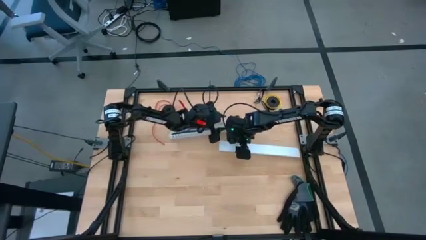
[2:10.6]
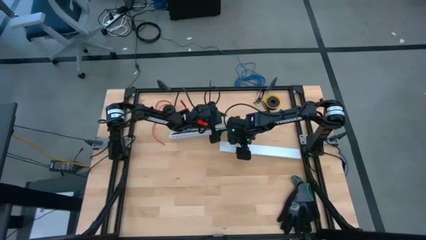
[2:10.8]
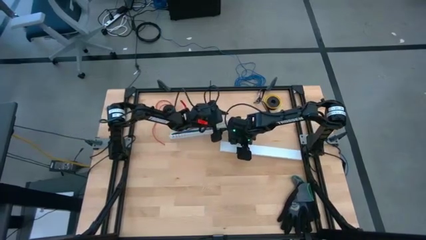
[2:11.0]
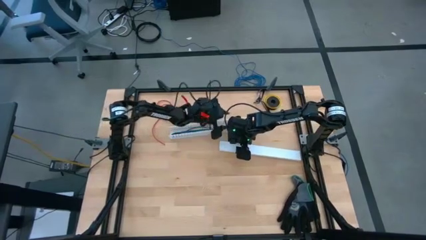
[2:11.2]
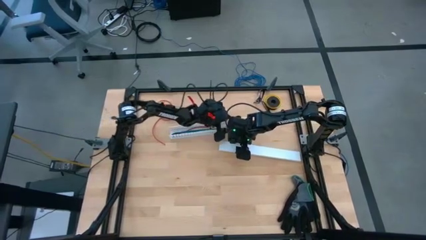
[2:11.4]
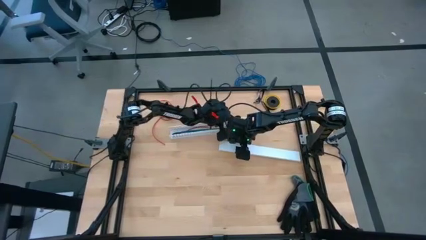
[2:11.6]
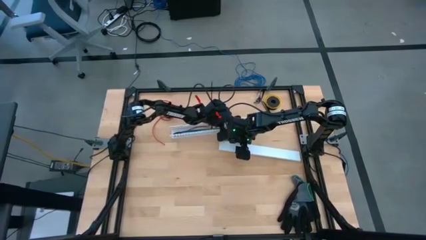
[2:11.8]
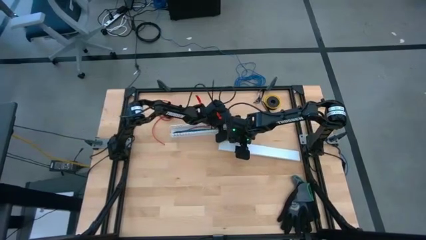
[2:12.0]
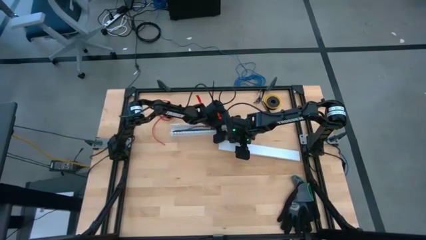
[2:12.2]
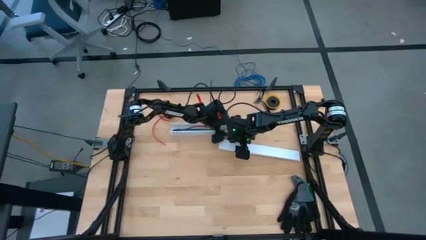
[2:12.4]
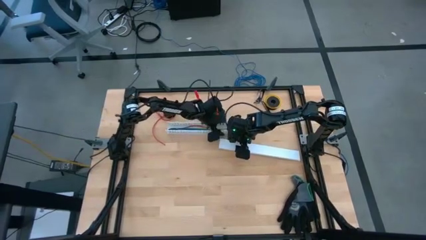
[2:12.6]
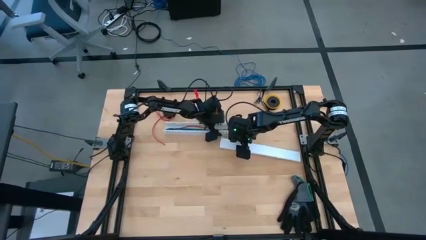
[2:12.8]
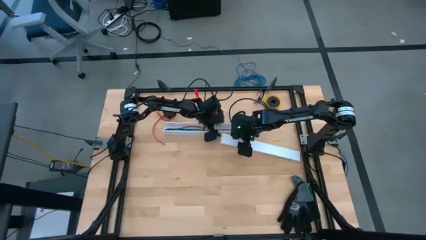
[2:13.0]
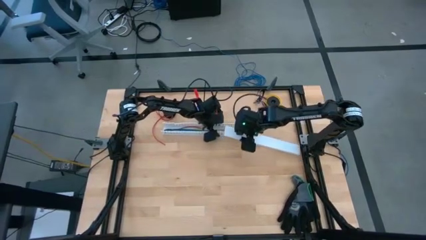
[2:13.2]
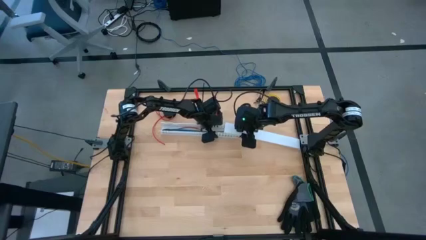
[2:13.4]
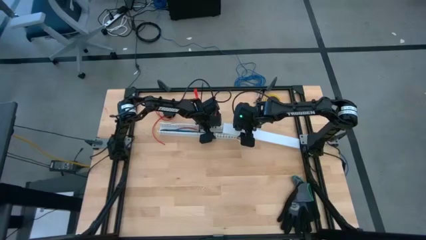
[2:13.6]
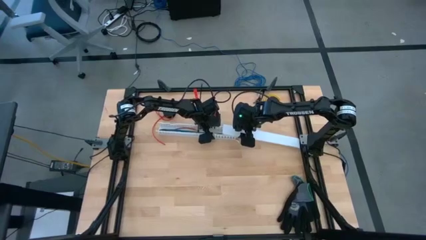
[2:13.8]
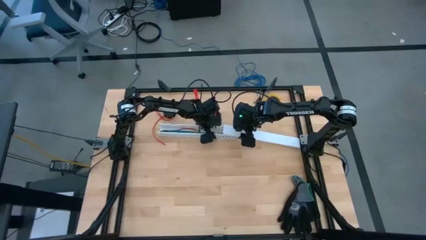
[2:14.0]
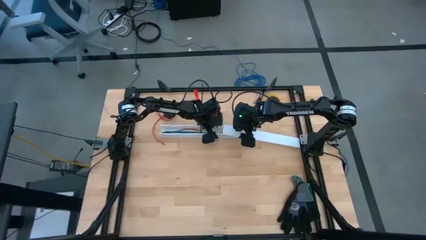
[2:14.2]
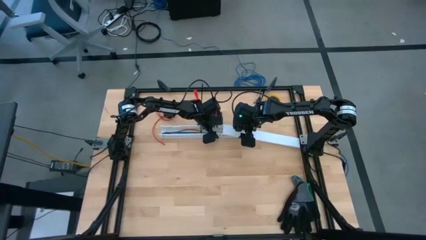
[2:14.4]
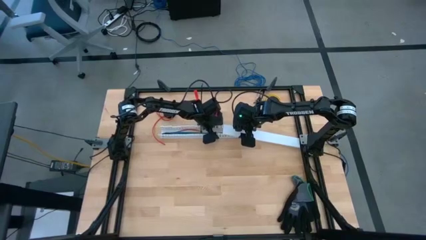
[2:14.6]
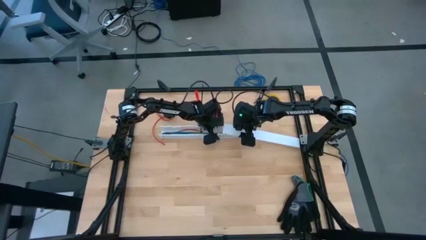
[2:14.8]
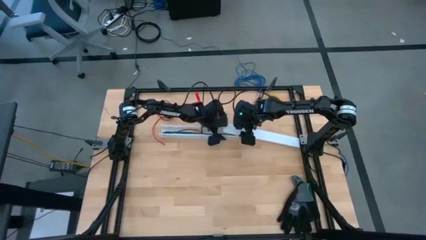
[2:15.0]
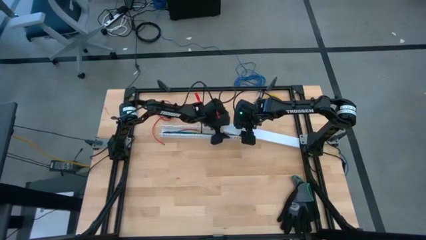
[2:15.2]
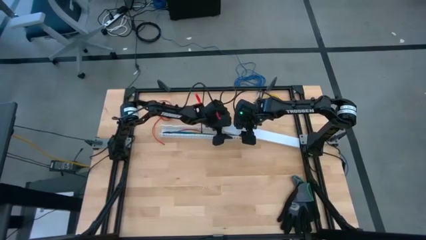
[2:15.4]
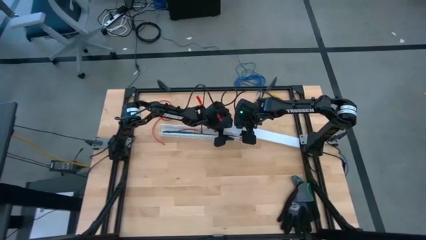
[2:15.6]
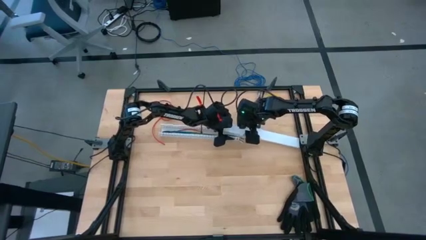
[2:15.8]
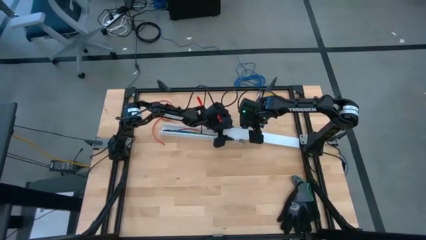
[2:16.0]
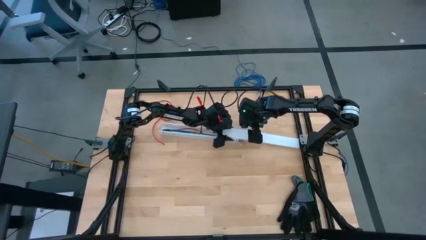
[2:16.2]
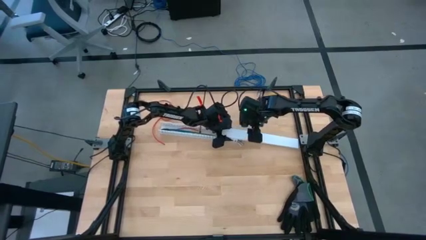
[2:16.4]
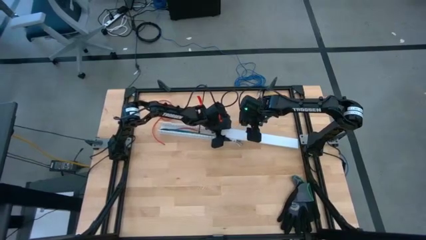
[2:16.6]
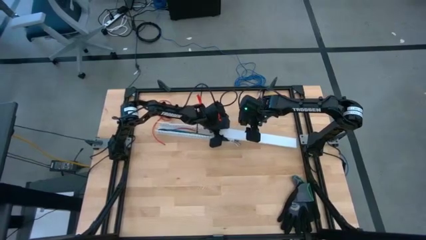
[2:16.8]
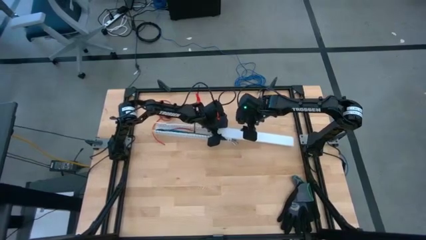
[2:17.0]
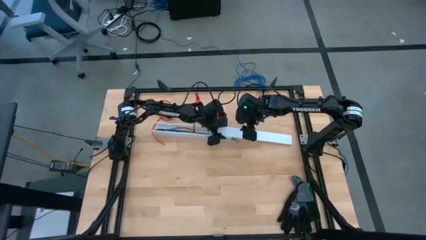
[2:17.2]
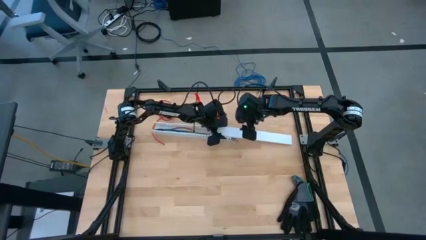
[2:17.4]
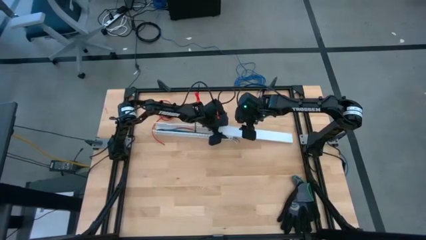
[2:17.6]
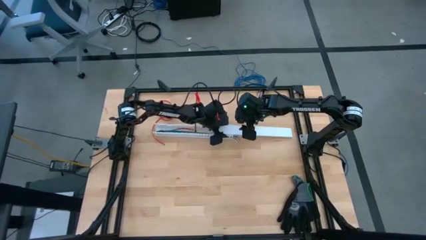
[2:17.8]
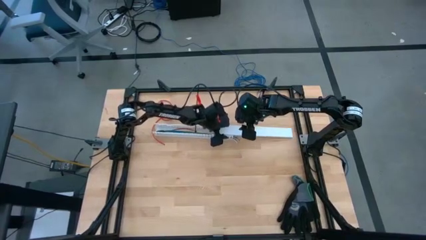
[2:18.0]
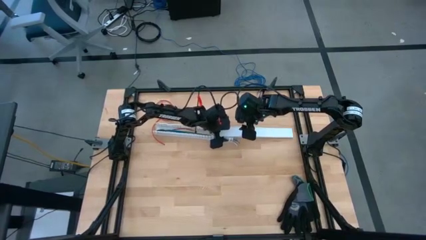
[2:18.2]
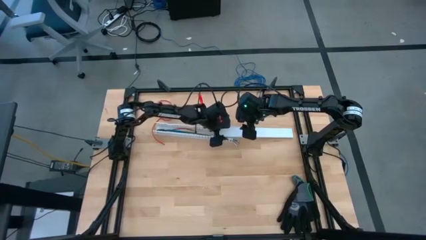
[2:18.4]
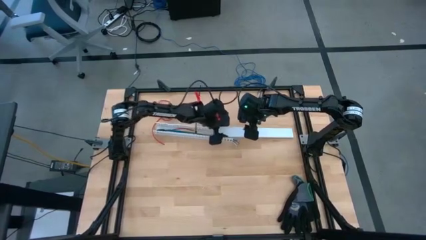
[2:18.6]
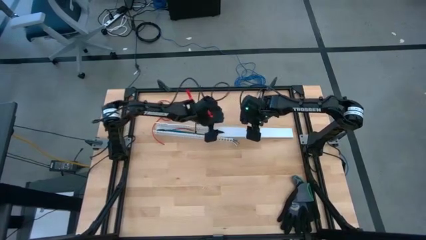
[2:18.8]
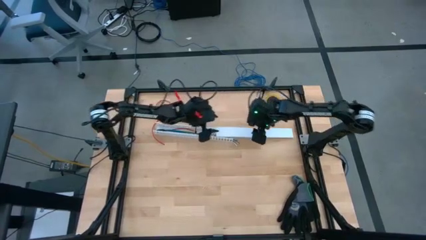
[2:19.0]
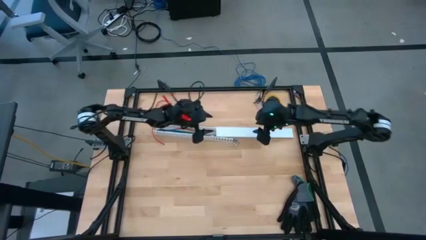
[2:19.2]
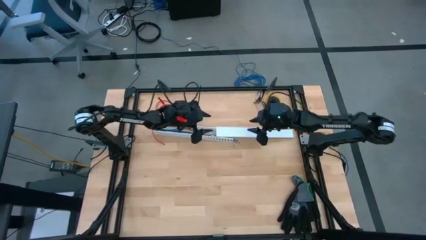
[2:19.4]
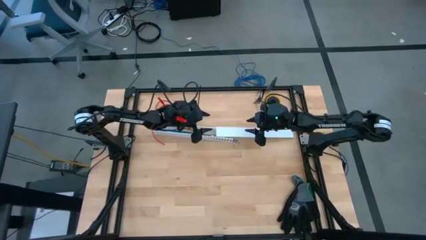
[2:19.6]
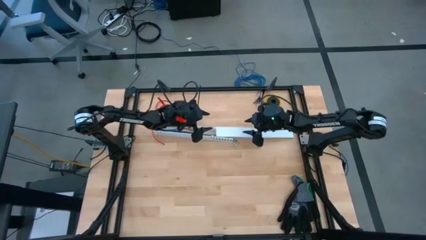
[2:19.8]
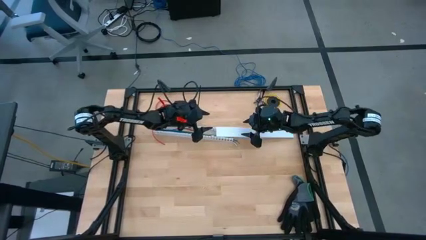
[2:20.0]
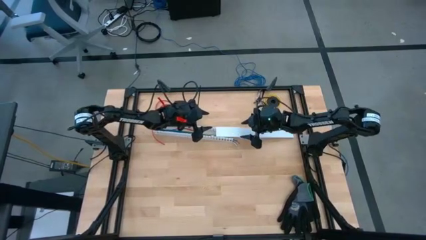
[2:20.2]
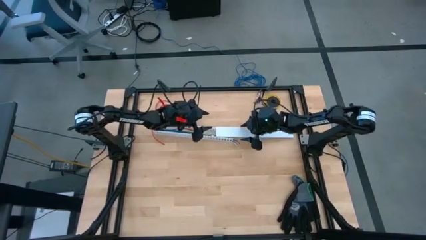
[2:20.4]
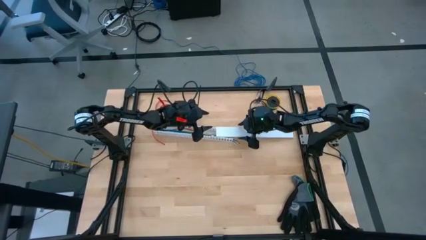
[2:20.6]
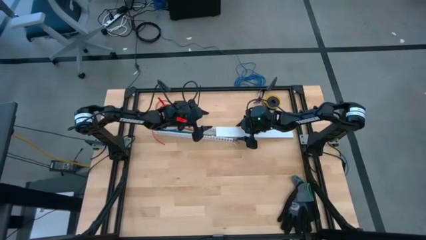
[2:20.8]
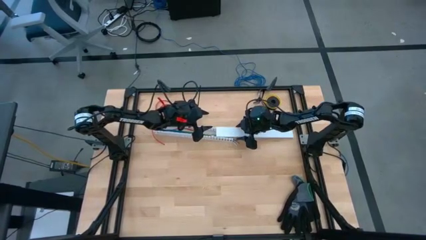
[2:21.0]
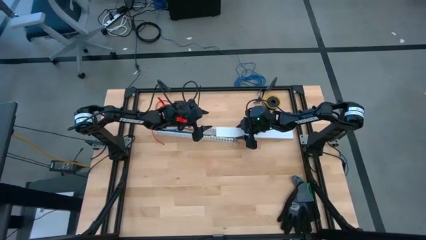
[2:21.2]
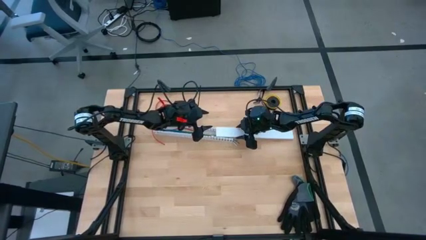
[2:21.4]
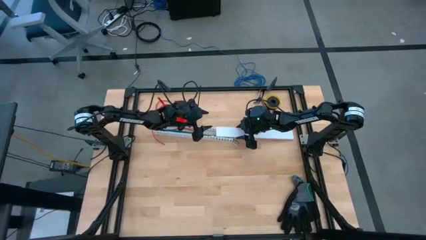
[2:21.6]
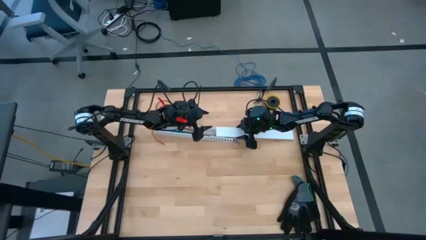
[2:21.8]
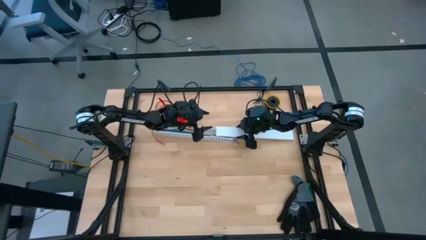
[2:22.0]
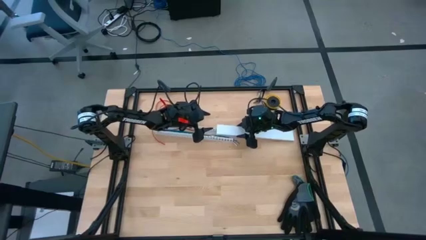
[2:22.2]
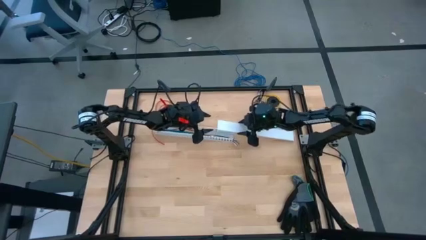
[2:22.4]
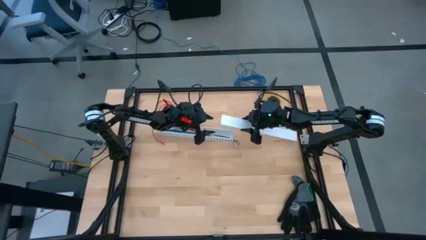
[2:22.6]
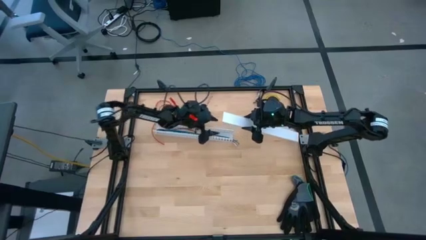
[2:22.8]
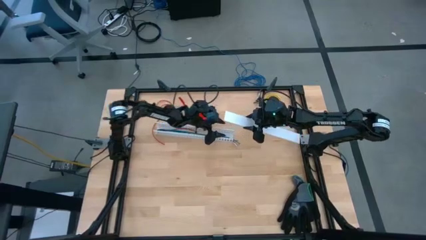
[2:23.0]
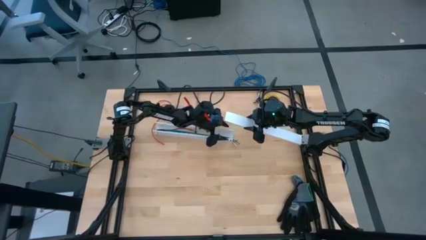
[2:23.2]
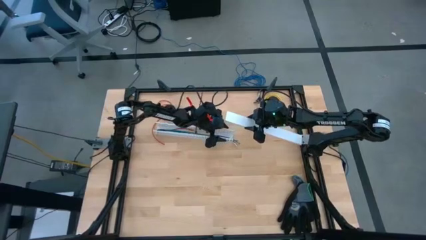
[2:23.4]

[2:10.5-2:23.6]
Task: Ziptie cables
Close the white cable duct

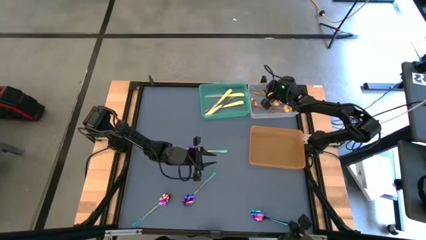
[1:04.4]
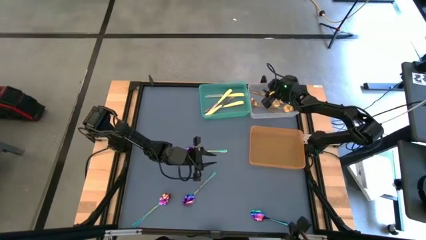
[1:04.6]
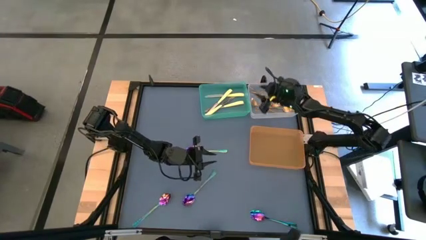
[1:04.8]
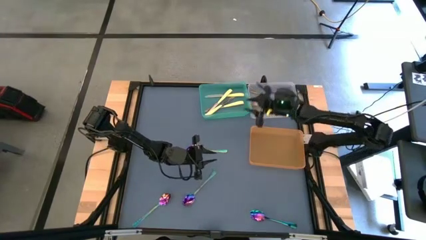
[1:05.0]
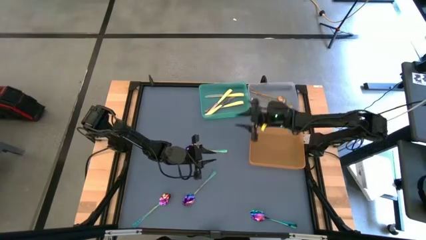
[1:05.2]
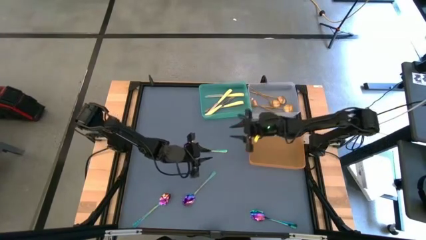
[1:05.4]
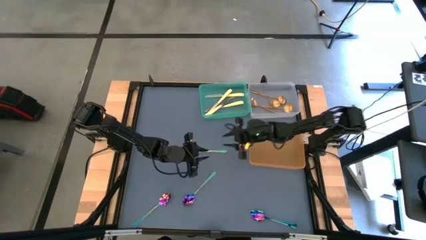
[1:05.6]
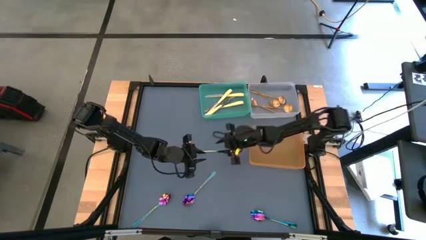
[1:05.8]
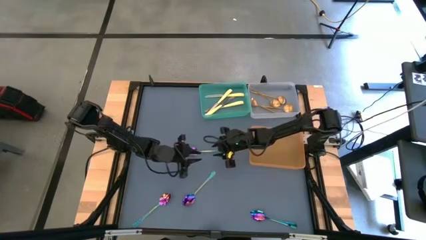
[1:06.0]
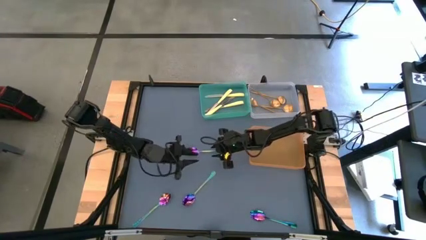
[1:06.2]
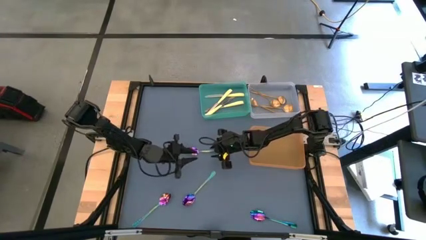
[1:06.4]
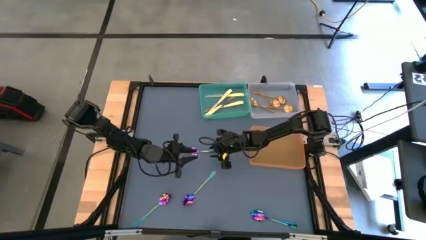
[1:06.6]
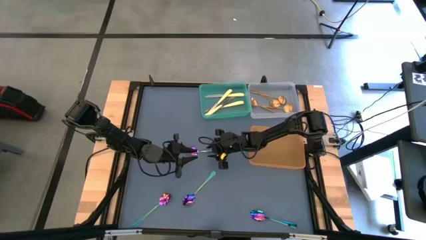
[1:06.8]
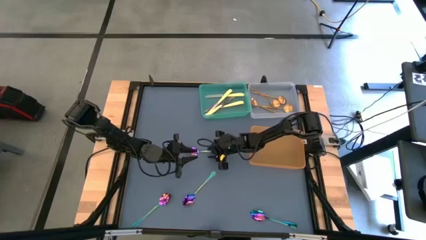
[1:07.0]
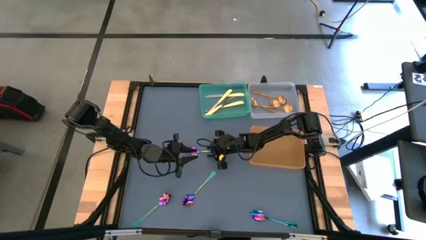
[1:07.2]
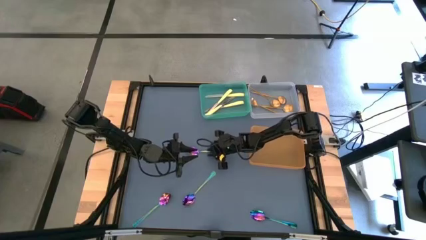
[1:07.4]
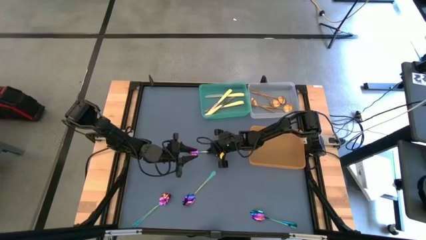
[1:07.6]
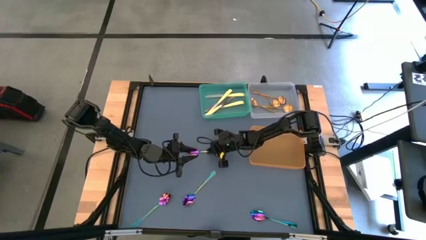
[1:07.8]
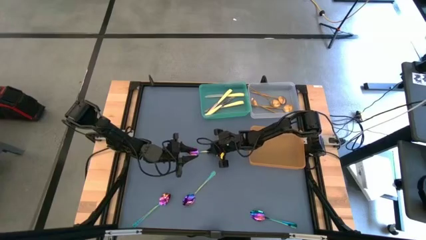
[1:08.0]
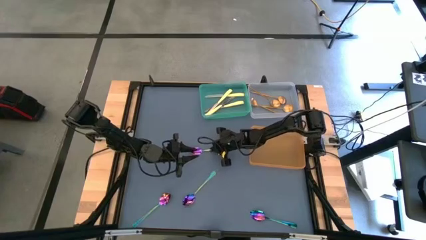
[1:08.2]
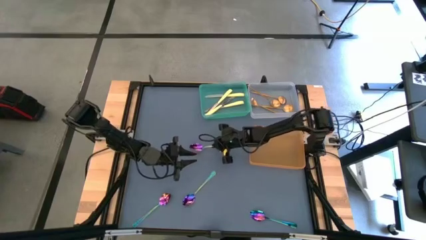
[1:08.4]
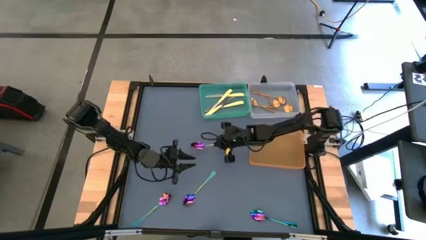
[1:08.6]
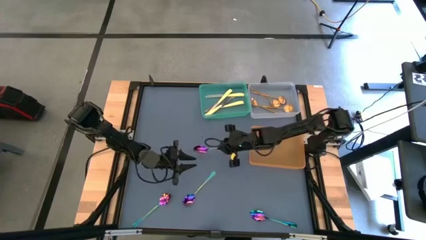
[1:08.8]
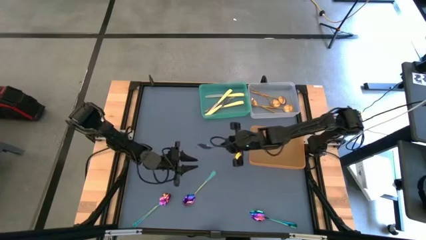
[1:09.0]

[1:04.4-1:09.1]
Task: Sort silverware by color (type)
Put the iridescent spoon into the orange bin
